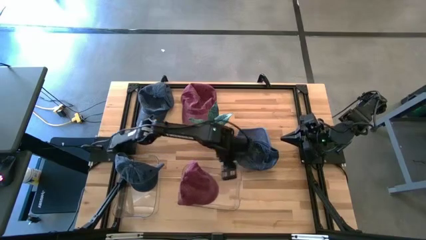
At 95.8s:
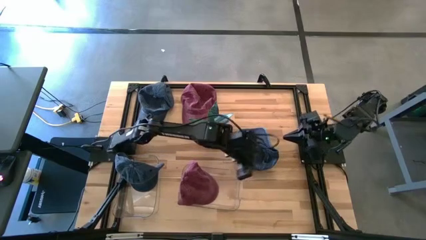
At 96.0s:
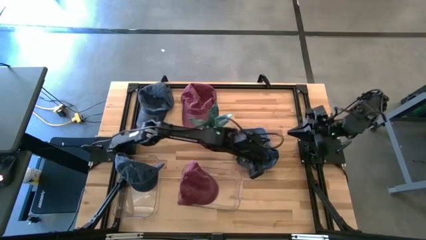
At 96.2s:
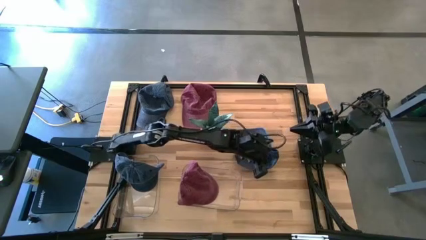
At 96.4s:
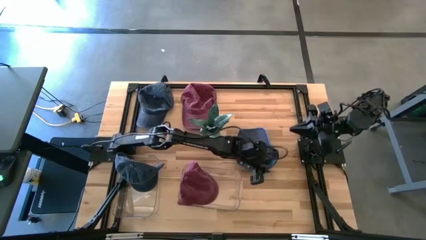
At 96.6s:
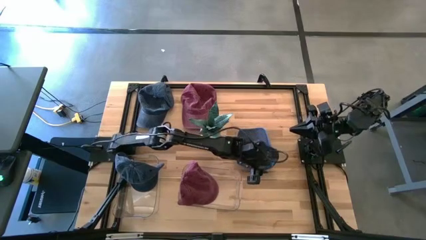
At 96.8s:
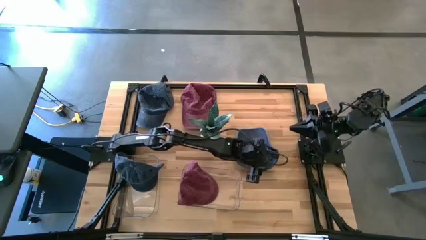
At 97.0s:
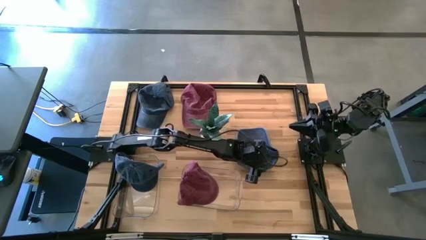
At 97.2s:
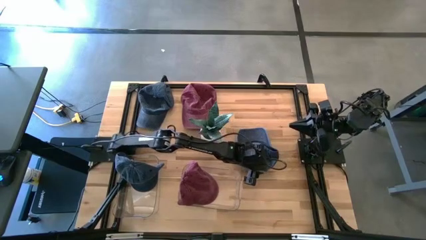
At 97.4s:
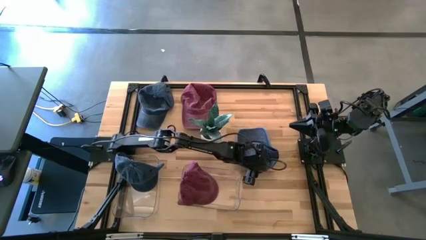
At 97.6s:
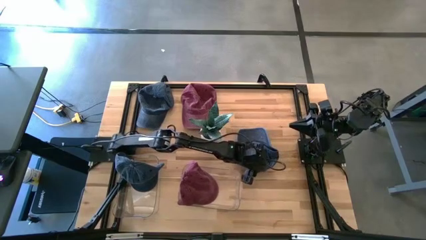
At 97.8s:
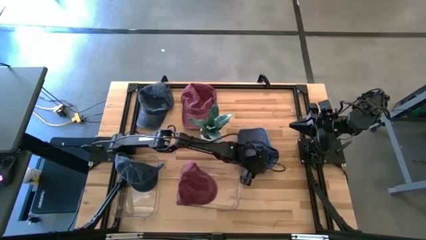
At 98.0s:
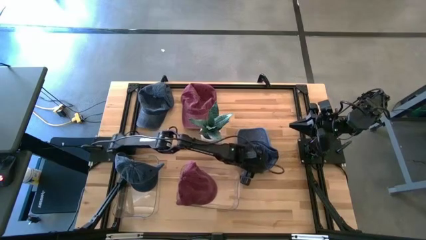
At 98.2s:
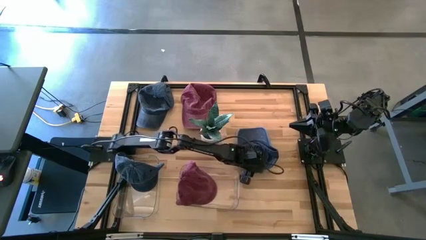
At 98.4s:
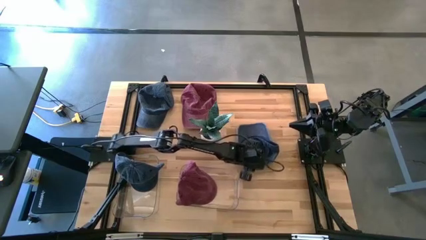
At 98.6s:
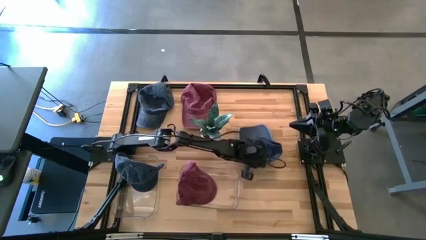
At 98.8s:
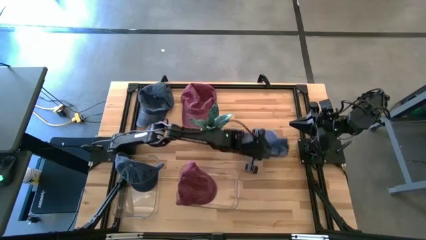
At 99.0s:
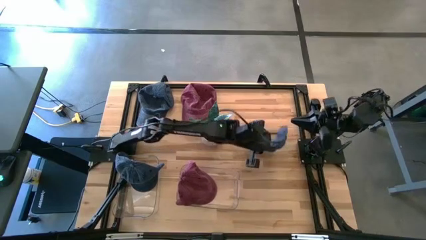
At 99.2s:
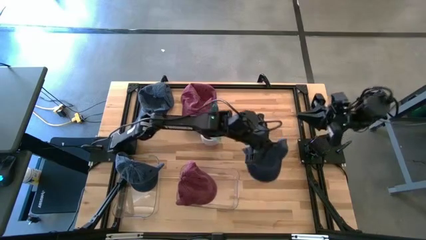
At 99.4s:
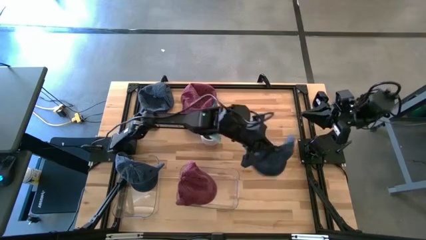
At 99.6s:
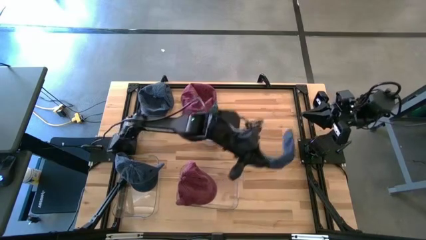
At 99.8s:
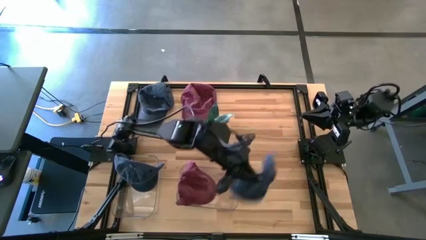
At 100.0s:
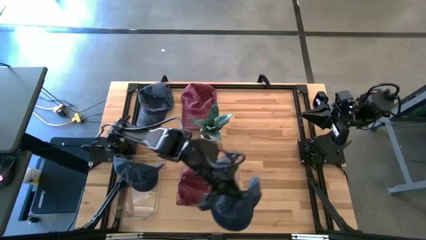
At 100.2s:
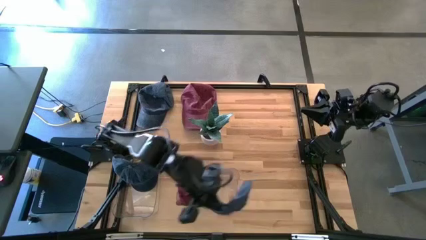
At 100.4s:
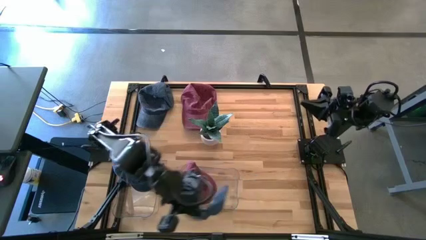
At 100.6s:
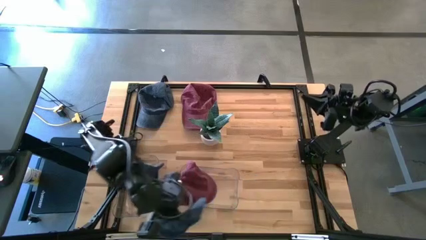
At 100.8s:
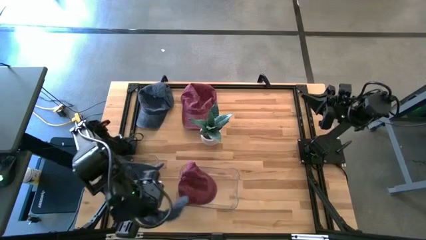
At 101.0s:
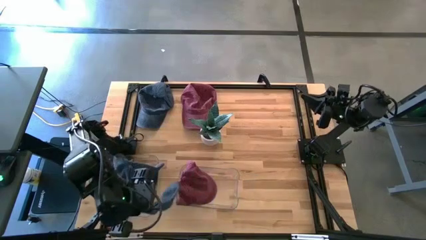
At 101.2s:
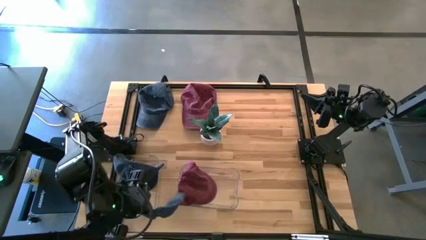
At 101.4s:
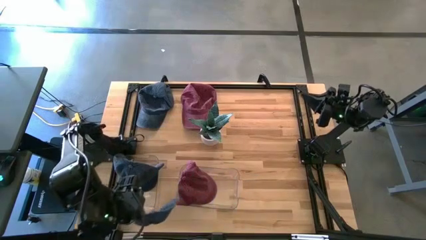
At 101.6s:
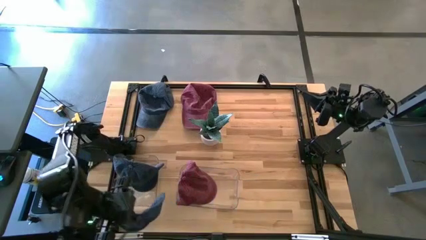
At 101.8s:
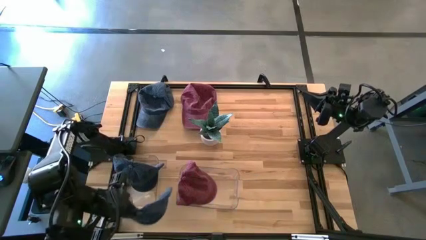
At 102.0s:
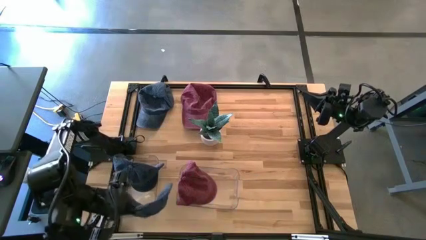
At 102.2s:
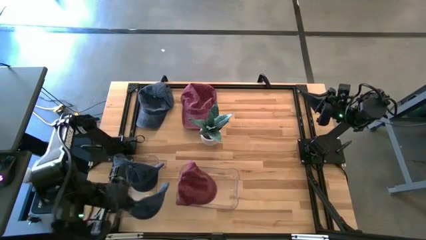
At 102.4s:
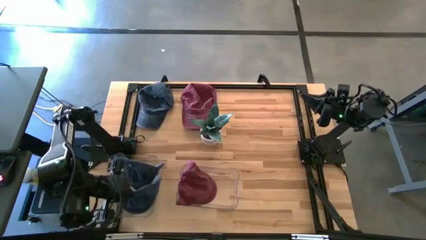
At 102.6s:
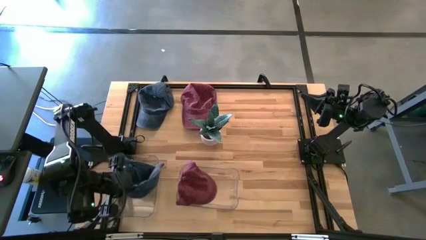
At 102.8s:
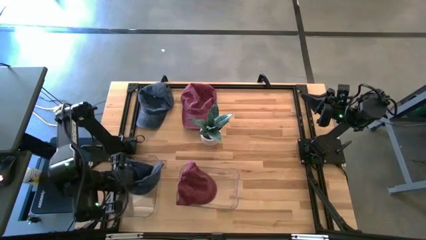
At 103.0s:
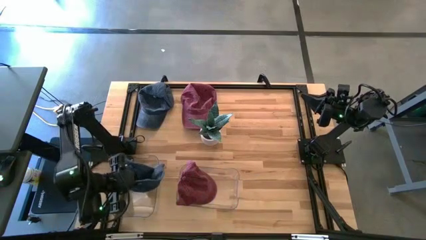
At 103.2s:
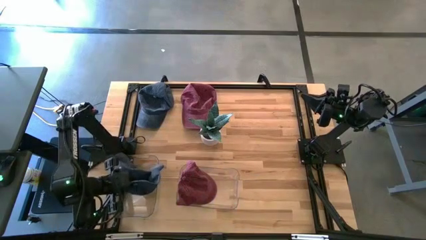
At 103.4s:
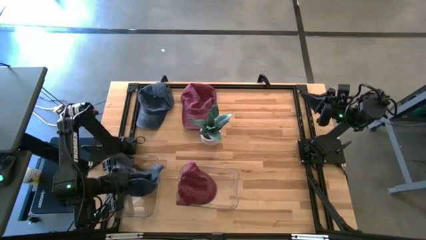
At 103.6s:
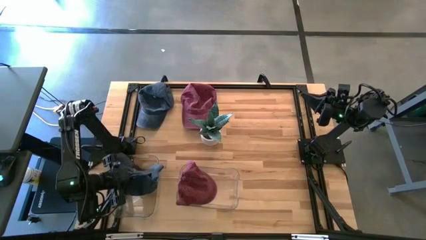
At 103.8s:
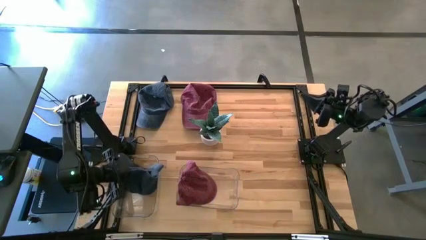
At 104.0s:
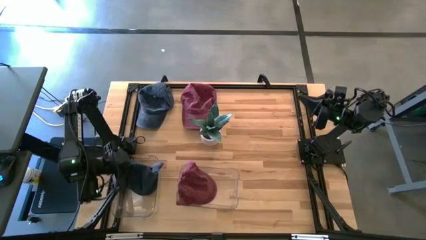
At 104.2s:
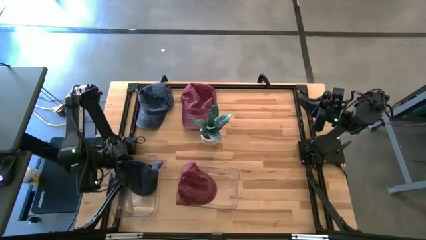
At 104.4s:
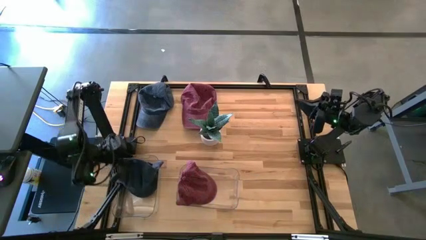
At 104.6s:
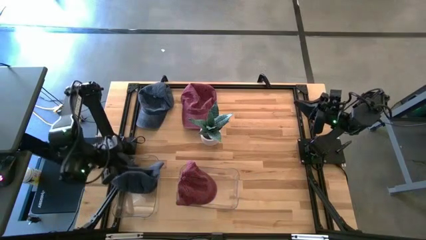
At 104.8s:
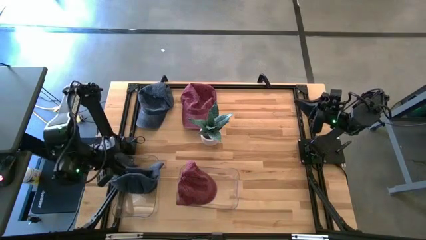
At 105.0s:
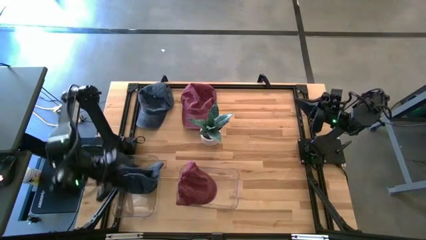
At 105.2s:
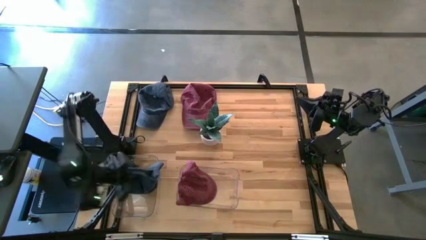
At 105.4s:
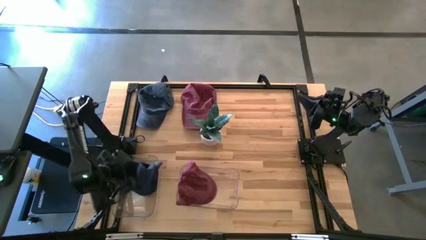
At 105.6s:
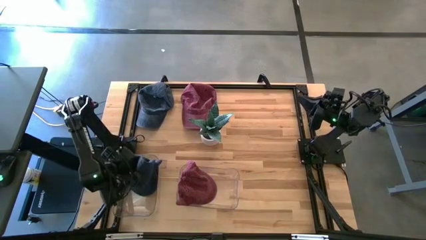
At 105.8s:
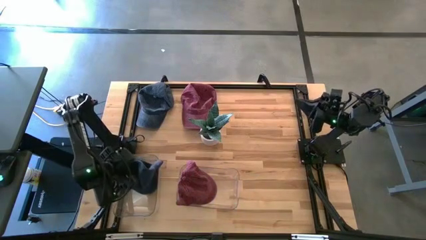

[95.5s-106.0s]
Task: Pick & Place hat
Put the right blue cap into the left transparent bin
